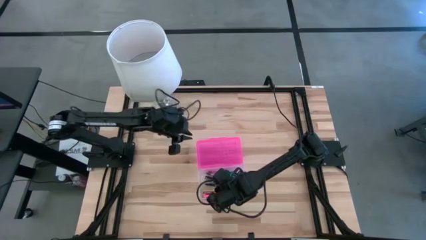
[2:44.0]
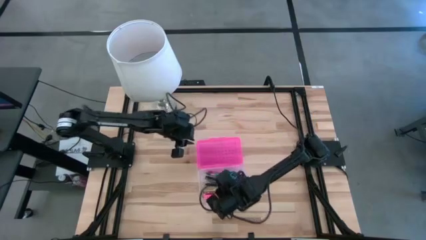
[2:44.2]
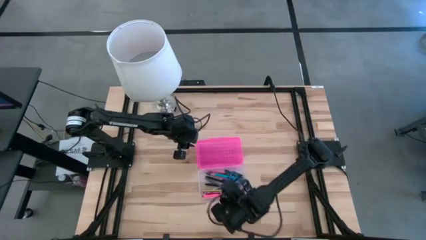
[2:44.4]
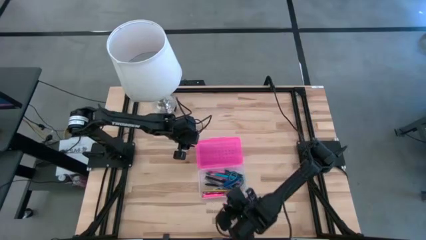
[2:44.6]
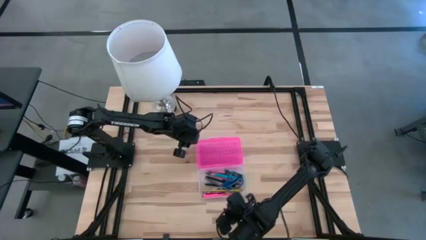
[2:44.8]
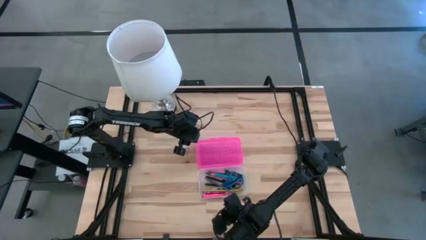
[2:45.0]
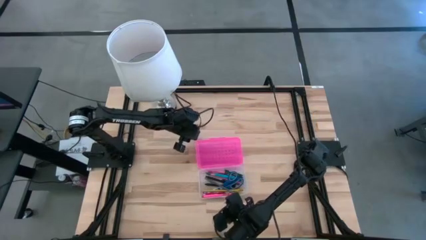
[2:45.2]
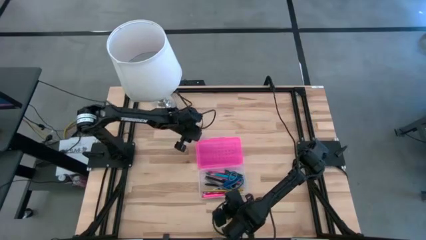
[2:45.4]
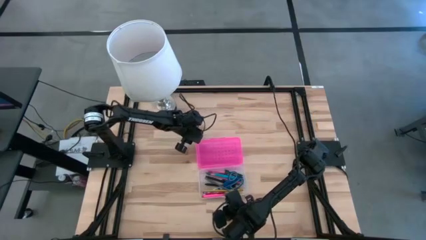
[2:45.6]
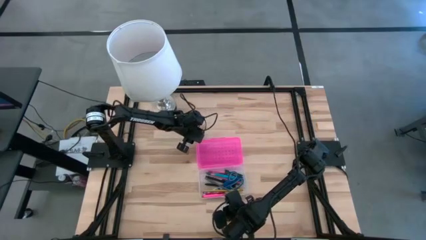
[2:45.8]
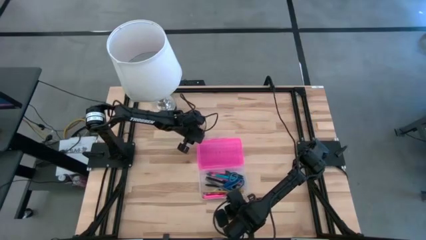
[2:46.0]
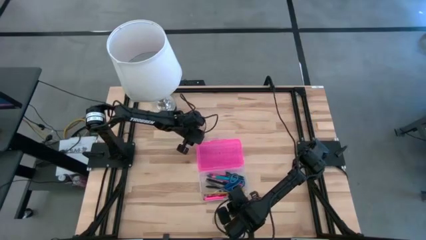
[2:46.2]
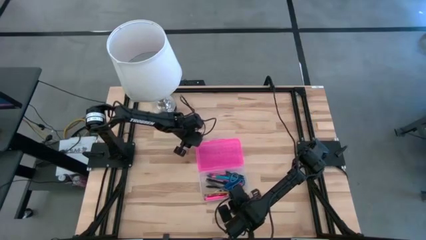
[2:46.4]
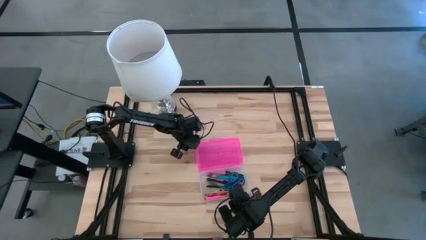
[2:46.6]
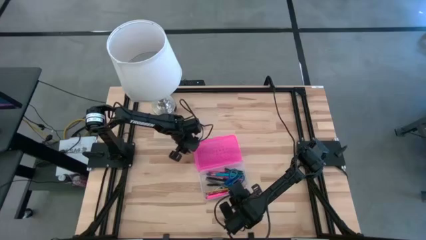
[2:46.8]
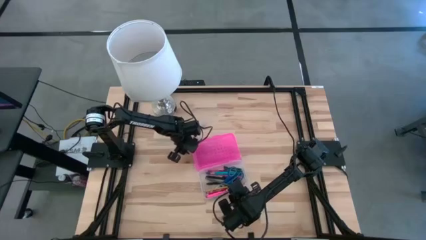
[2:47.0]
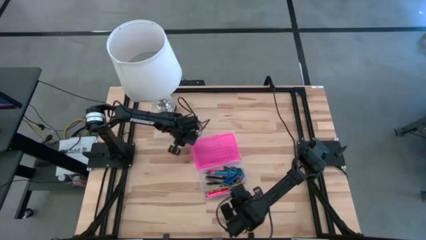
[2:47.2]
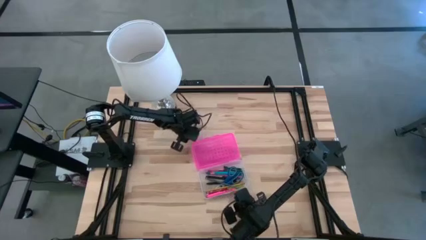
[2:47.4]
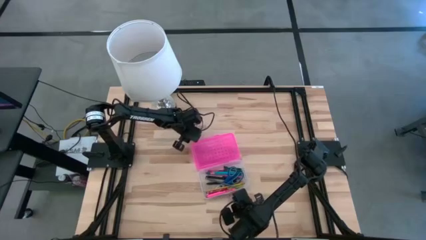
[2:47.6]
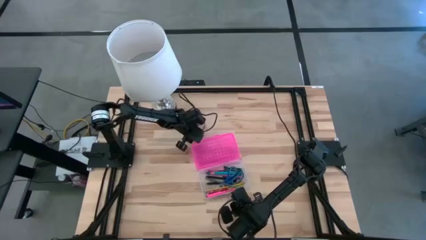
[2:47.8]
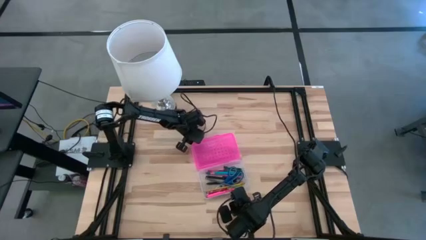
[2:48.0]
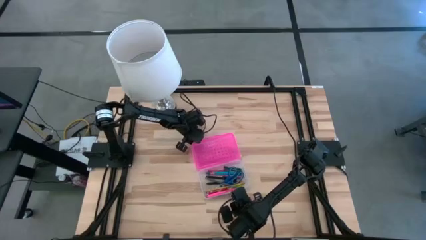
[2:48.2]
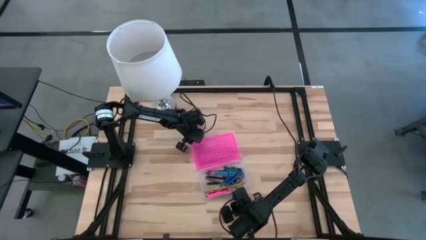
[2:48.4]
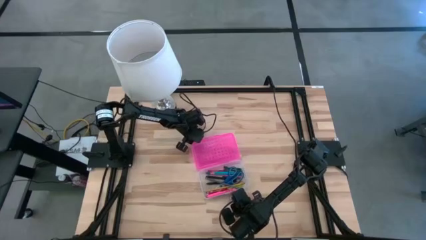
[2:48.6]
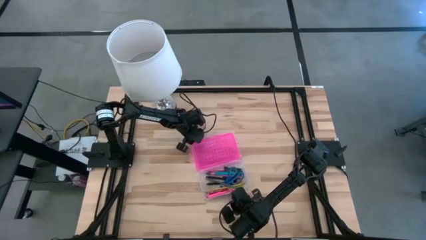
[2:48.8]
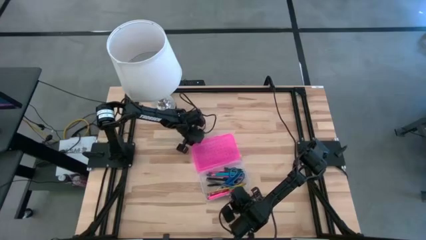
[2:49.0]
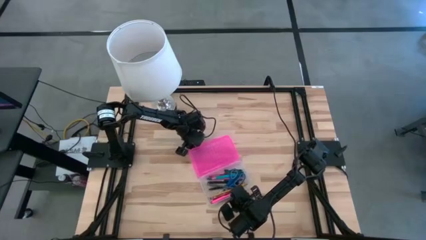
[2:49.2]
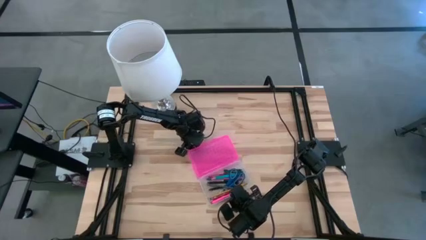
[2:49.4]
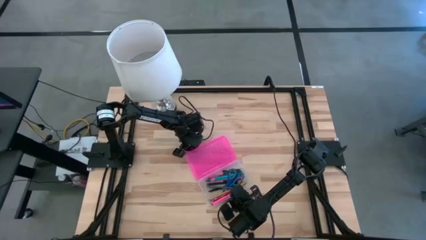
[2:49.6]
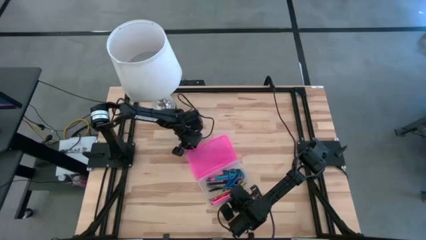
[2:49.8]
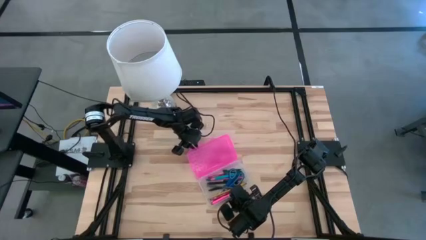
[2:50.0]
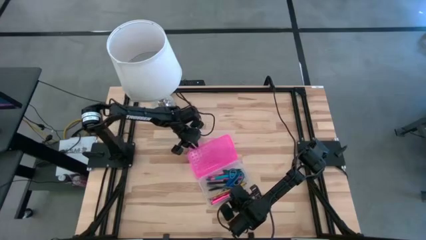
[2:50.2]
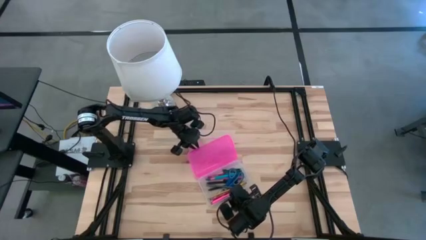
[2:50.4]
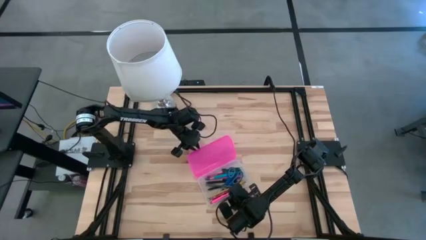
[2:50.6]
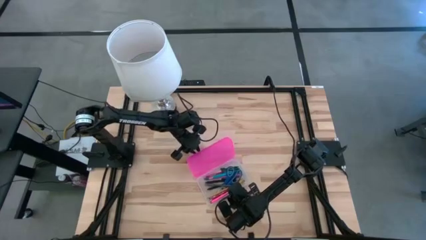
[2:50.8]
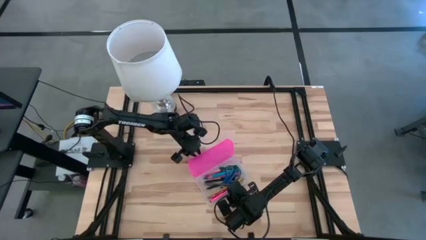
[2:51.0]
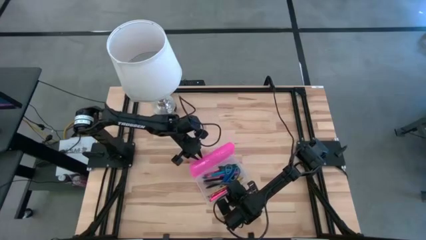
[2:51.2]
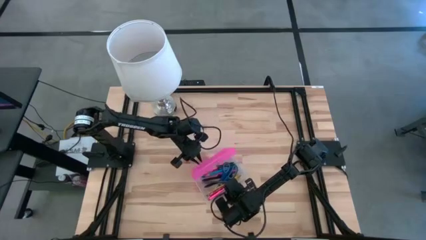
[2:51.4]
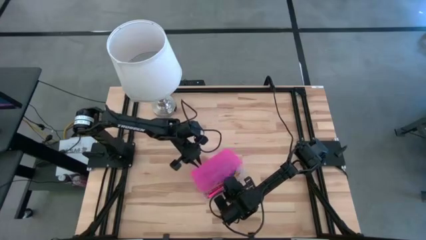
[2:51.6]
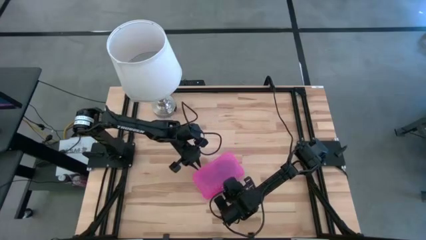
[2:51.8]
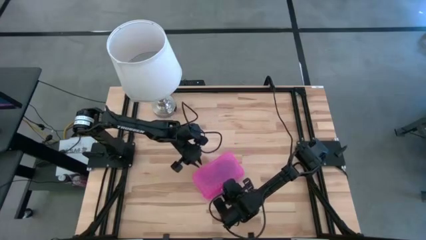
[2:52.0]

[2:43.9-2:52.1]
Task: Pick & place school supplies into a supply box
Close the pink supply box

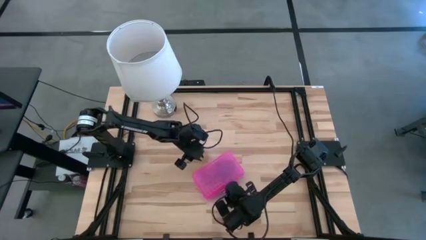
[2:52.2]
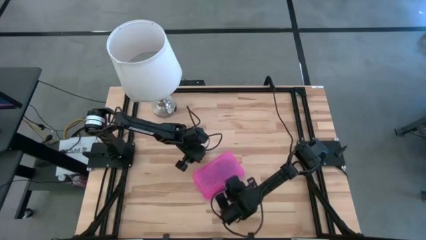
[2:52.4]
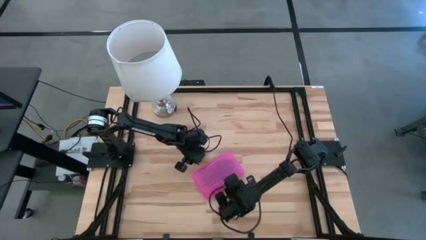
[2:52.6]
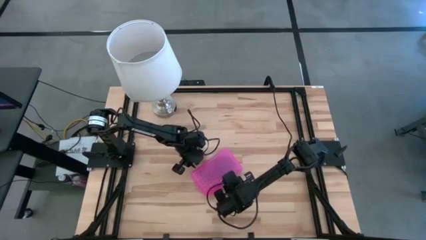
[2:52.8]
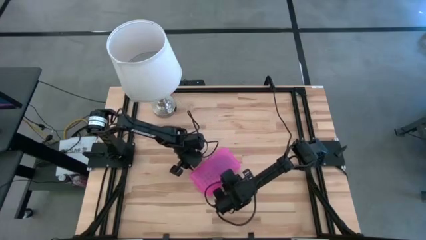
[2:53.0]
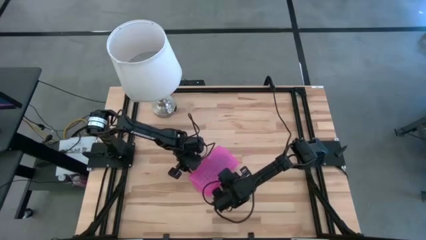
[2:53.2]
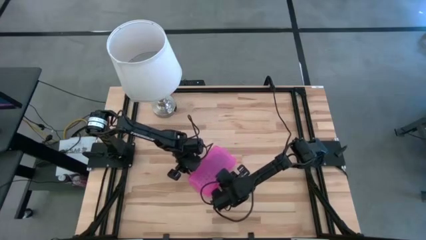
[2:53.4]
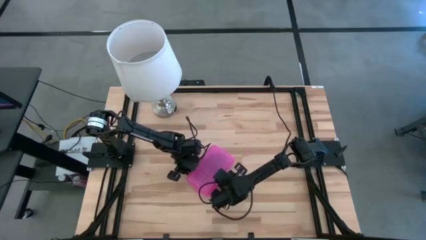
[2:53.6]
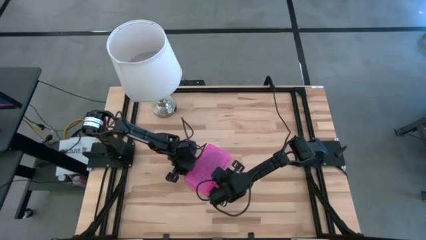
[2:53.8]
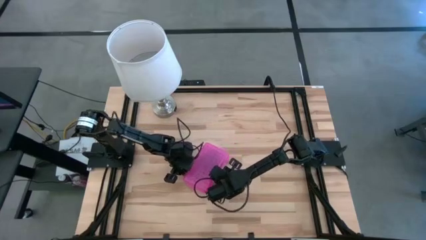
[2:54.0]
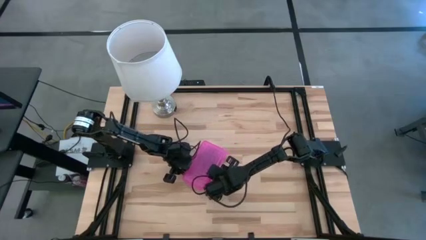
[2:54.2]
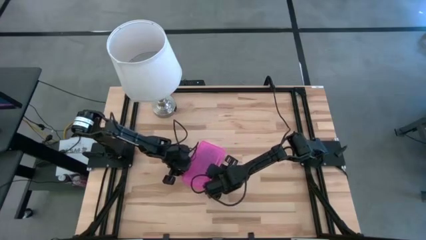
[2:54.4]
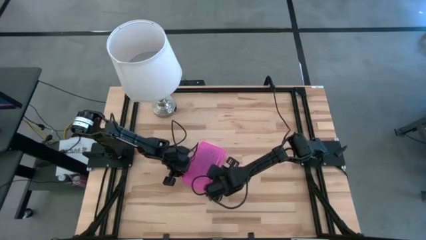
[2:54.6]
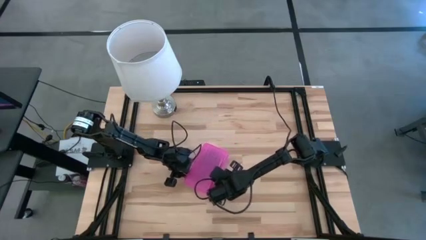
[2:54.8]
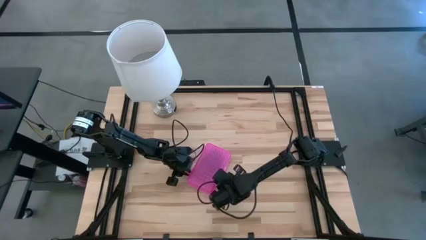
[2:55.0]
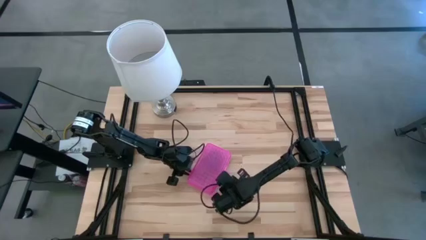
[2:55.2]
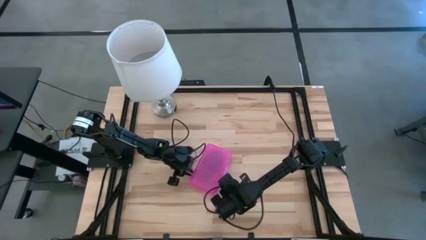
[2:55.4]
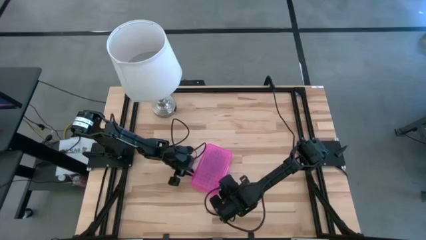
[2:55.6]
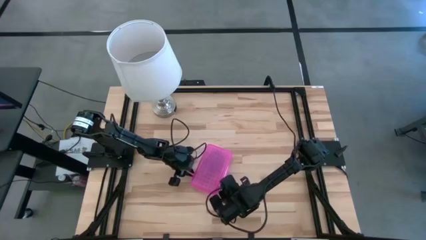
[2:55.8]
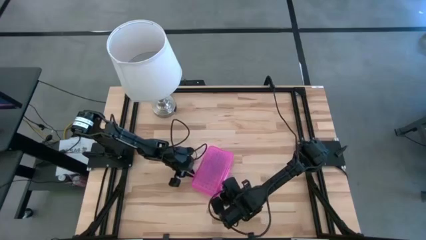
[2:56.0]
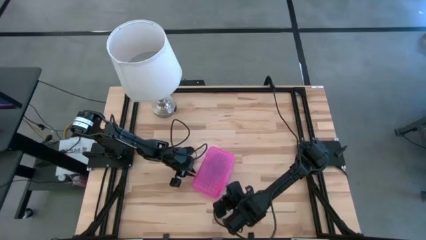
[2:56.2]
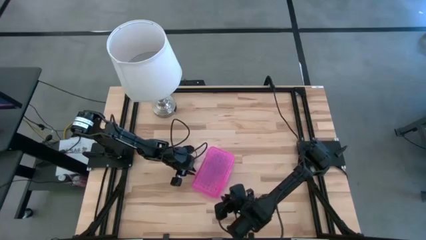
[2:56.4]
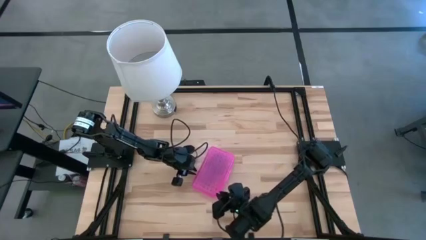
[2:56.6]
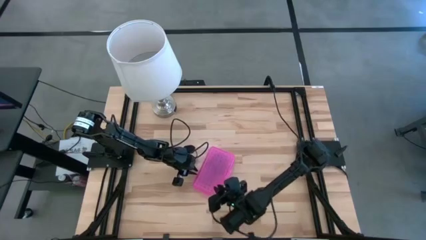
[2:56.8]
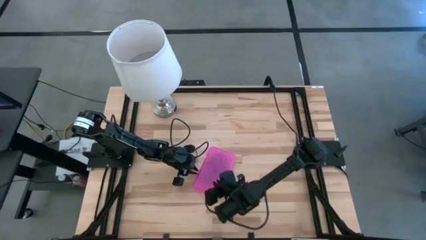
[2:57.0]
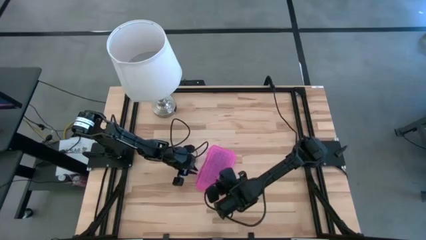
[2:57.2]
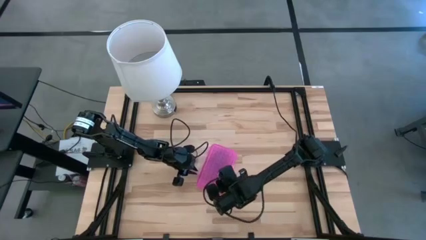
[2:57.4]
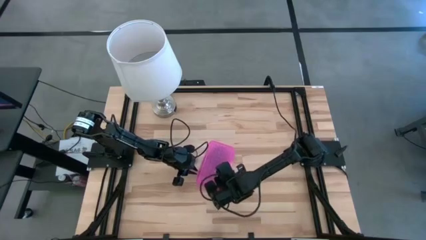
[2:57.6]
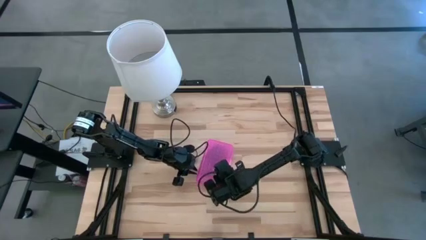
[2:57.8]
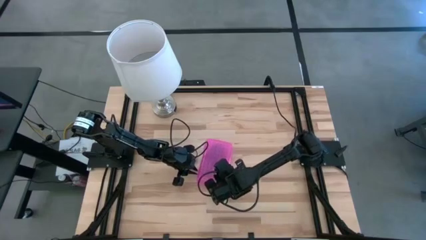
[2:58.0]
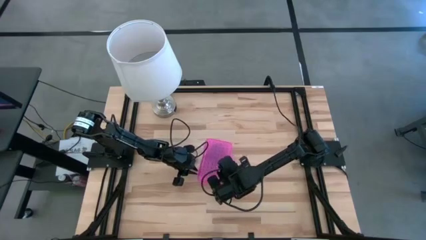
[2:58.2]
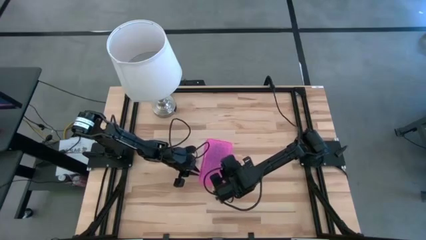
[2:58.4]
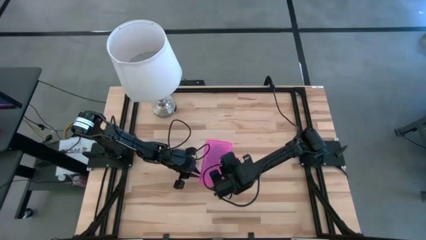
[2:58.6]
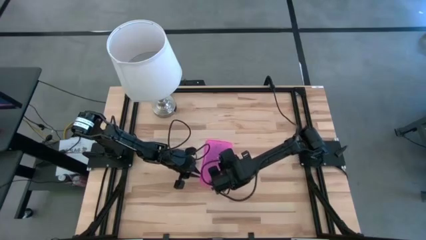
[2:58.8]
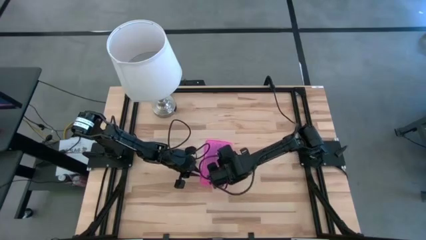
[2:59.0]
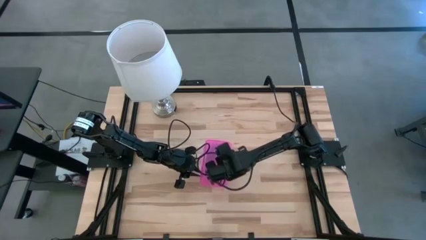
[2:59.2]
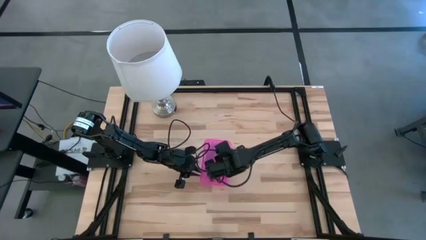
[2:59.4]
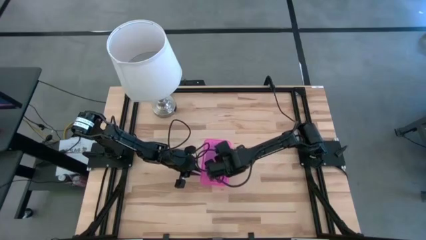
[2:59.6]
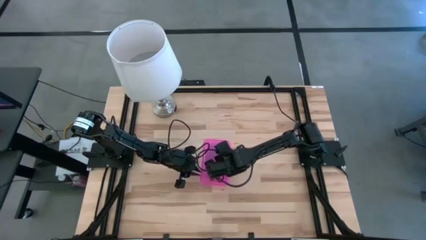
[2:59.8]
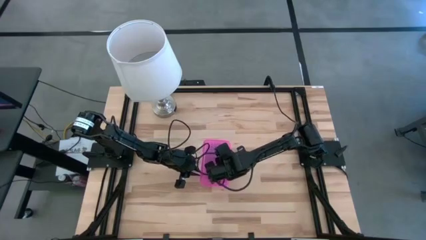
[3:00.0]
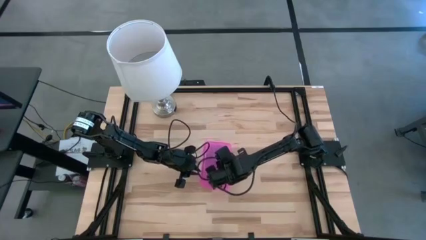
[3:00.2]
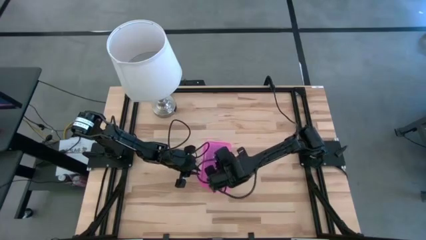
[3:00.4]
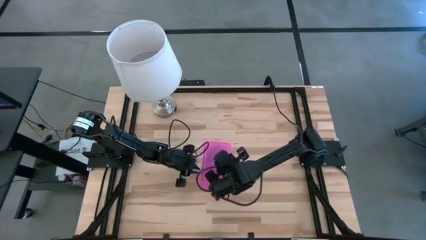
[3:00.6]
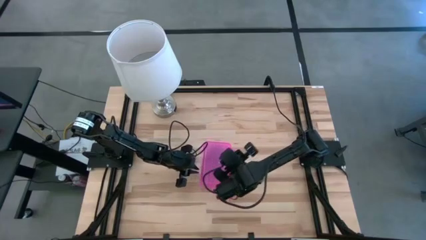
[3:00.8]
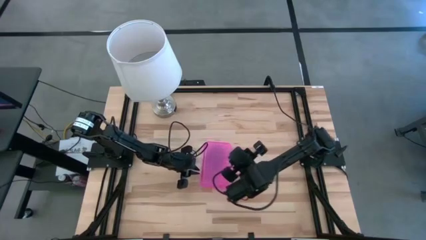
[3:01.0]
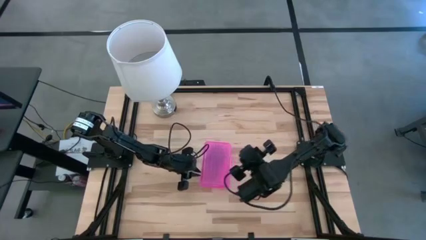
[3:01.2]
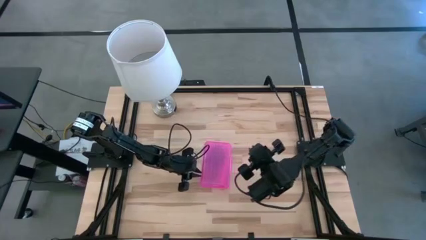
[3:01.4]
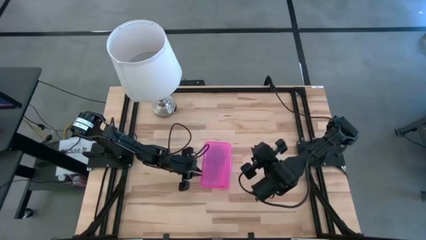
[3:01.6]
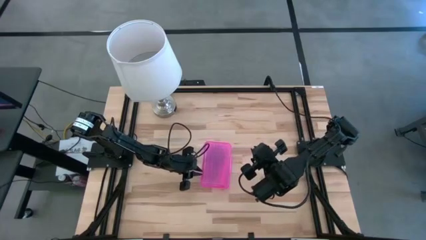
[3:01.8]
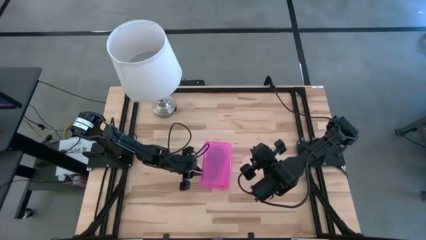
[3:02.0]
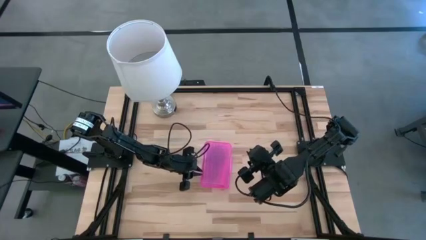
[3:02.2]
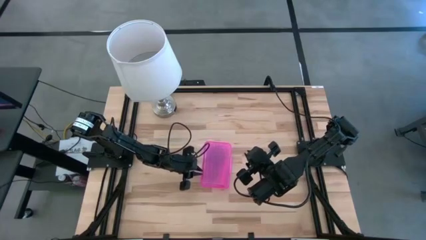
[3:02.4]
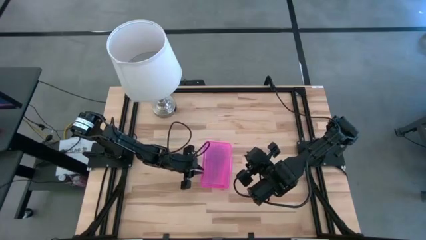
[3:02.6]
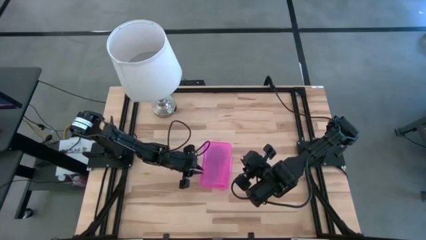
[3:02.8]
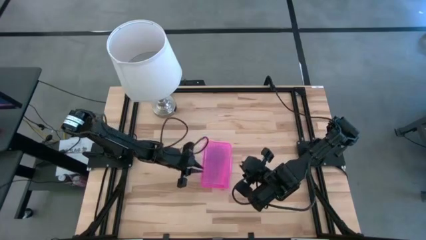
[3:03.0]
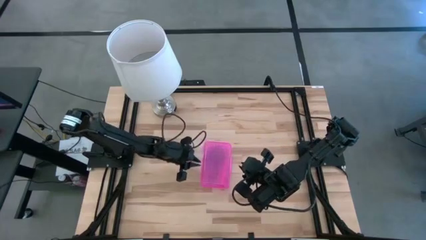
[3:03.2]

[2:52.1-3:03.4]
Adjust the pink supply box
